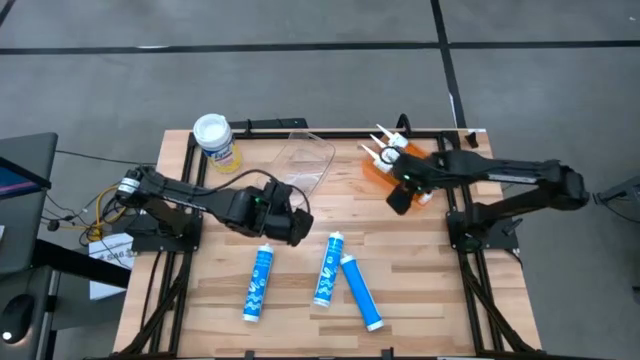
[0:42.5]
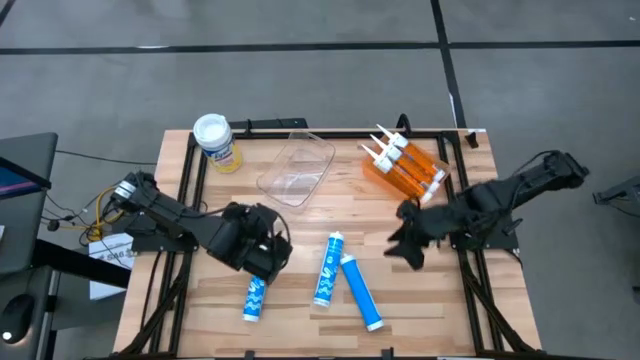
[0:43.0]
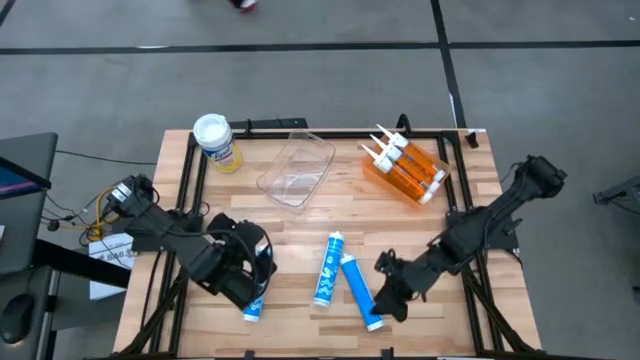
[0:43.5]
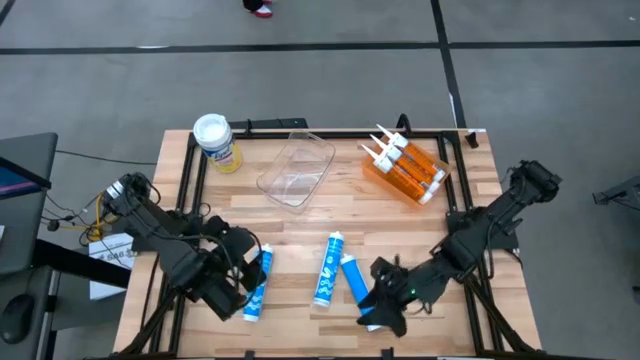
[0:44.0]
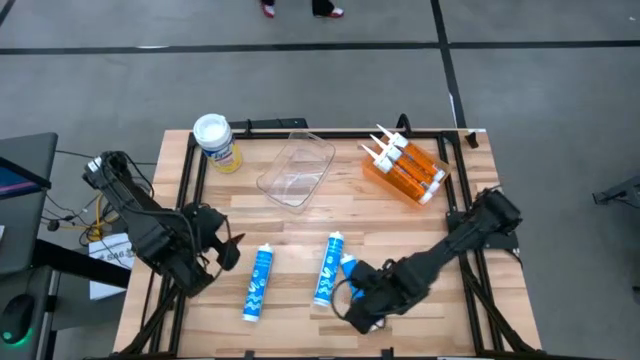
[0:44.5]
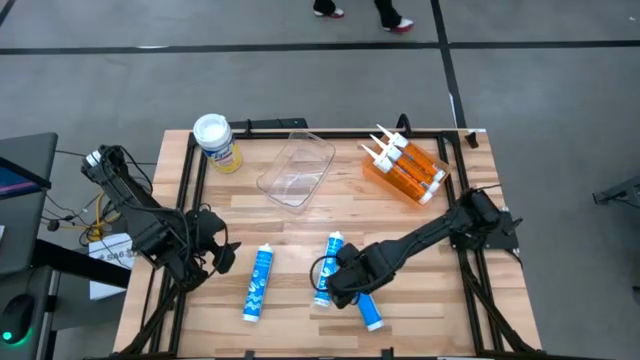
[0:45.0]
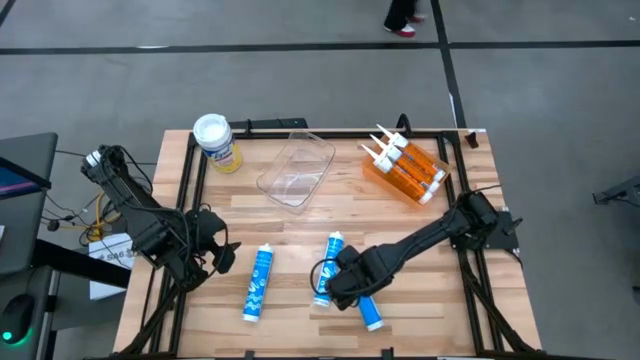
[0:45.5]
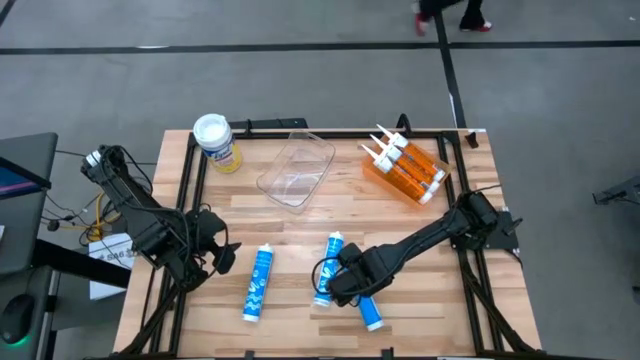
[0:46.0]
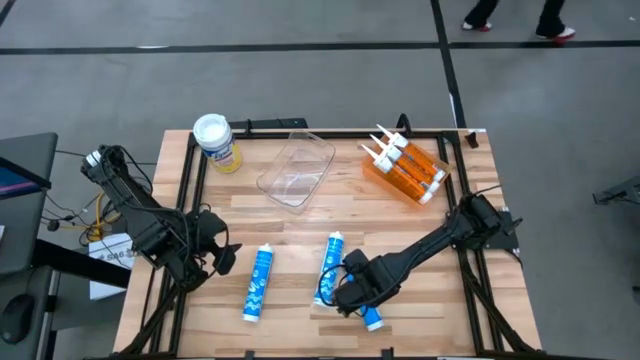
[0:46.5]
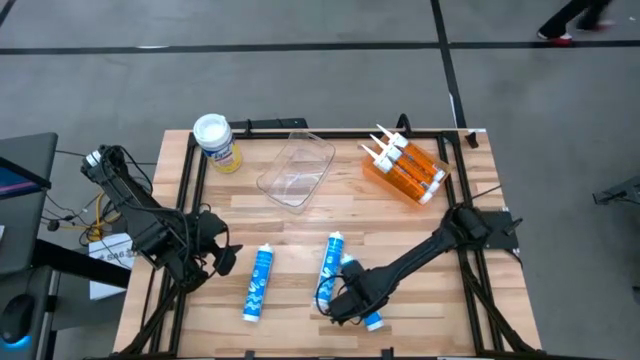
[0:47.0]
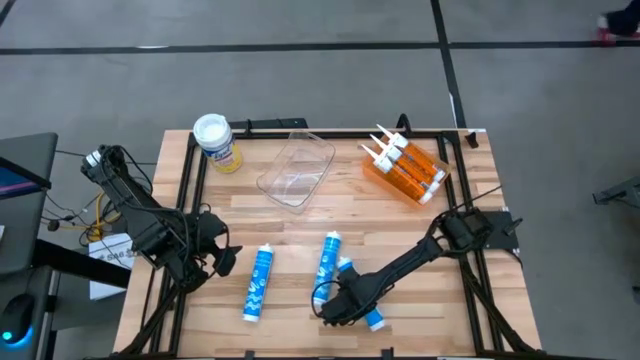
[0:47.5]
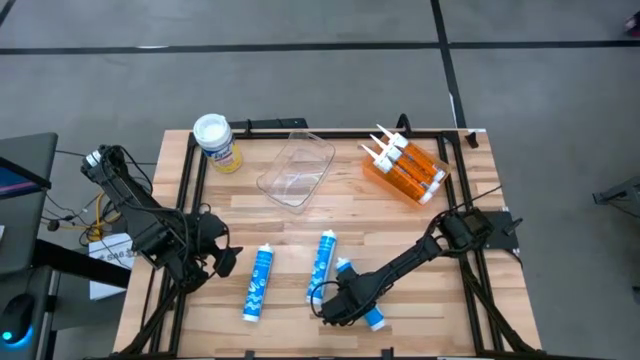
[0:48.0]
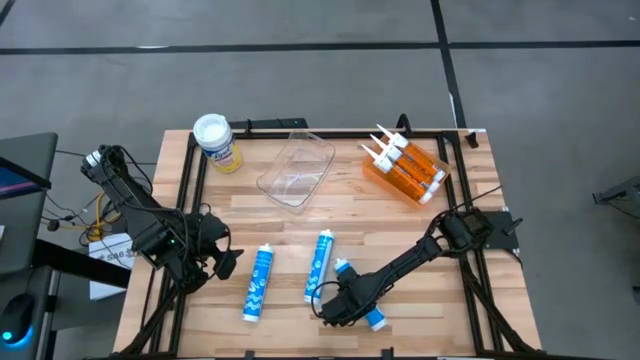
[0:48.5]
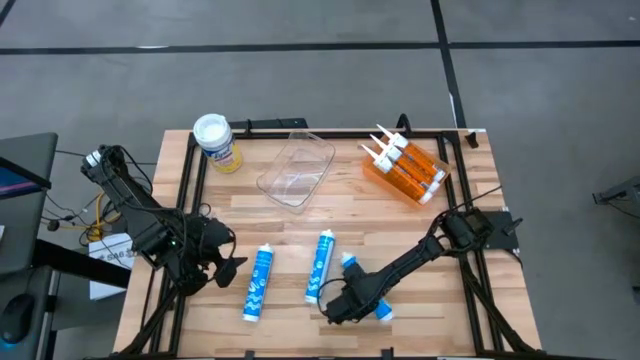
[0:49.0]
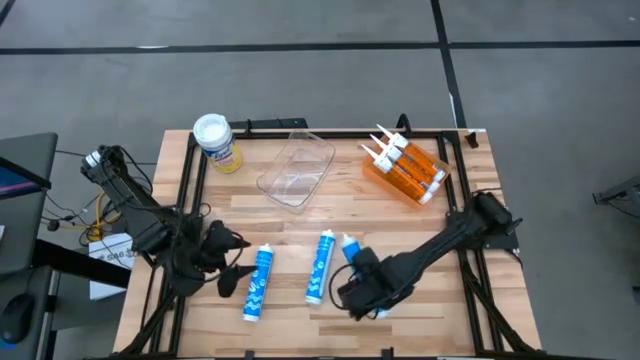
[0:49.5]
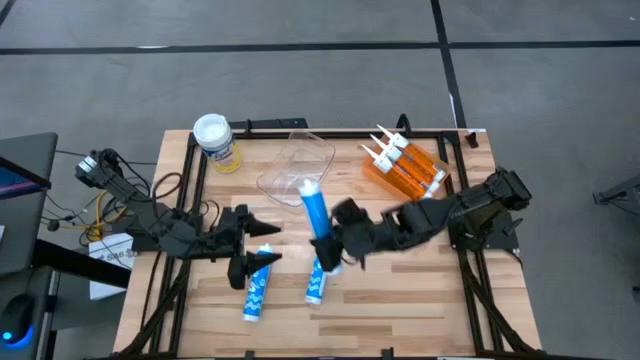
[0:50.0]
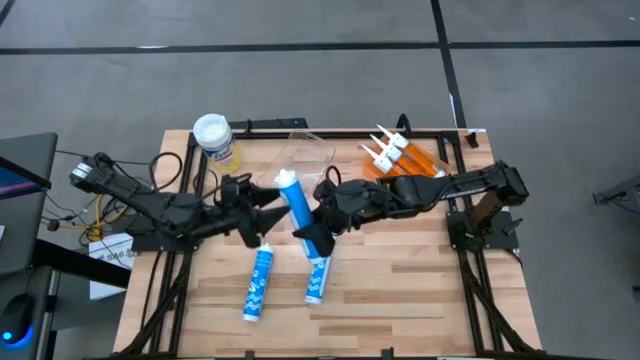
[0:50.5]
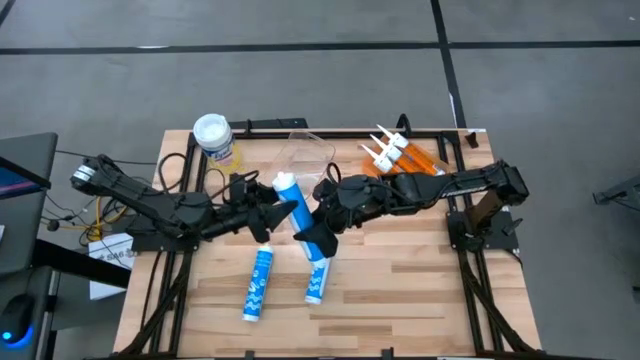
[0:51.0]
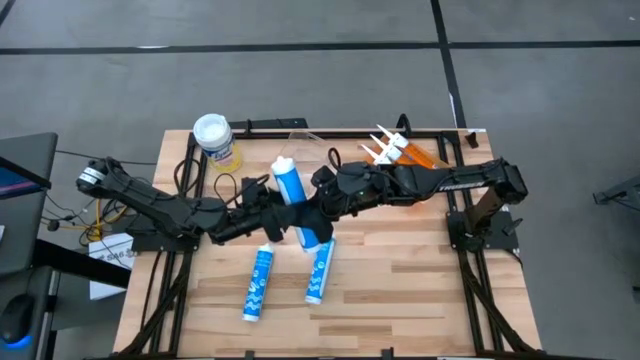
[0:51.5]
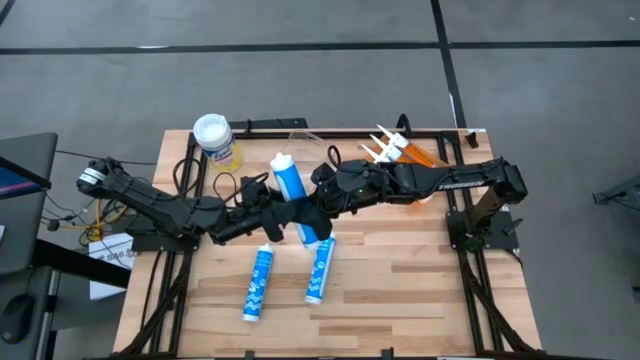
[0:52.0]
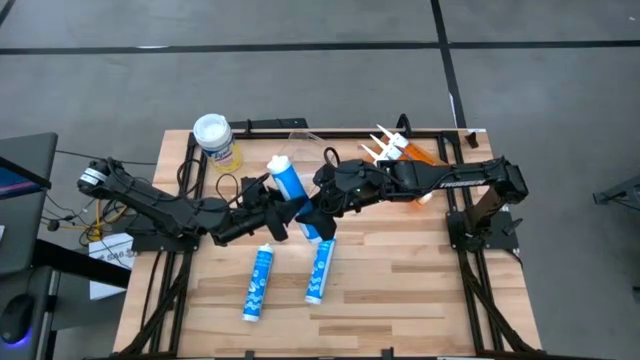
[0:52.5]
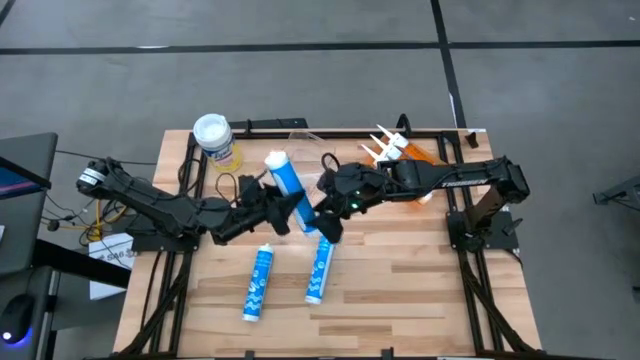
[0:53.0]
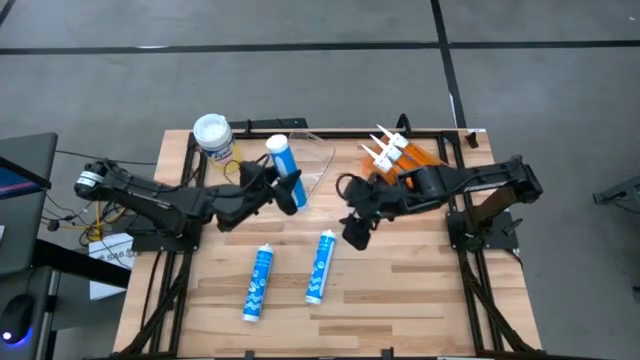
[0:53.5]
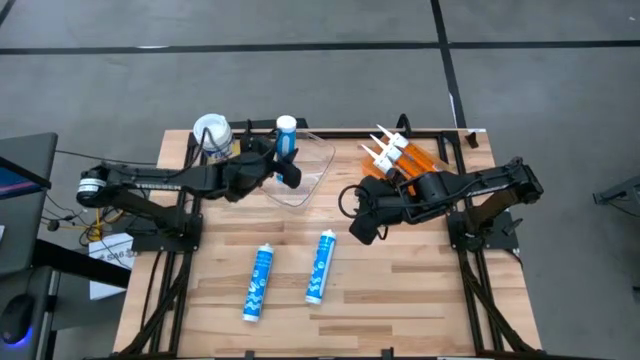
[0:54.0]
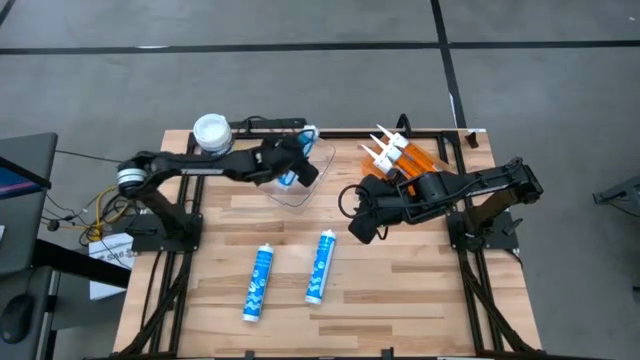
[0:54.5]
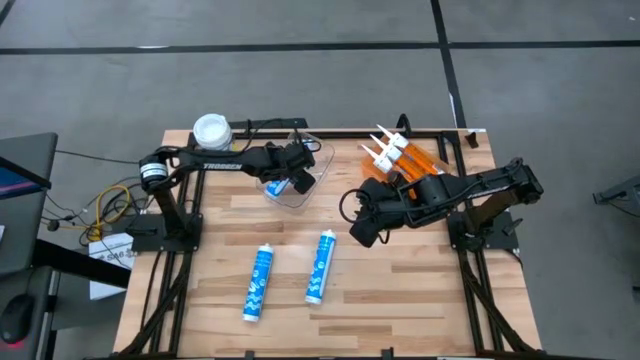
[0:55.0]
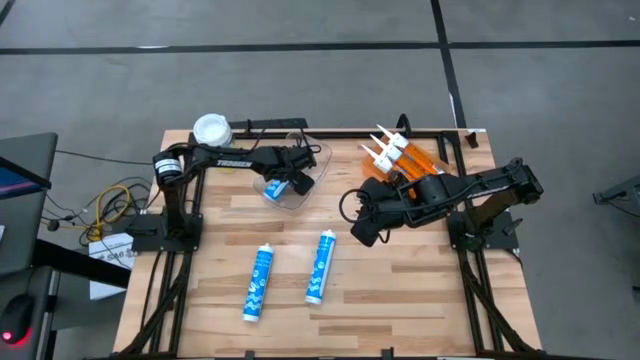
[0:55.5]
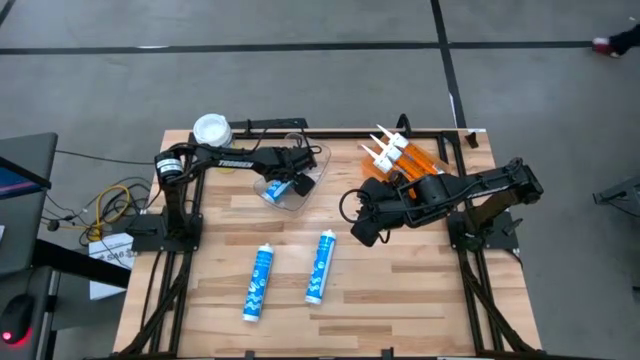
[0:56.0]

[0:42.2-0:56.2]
Task: Pick & place silicon tubes, Sealant and Lysol wipes
Put the right blue sealant into the transparent bin

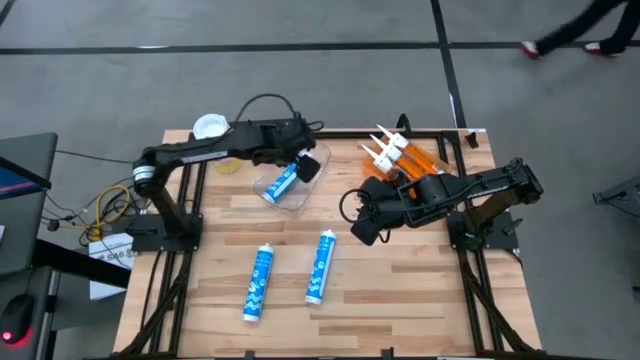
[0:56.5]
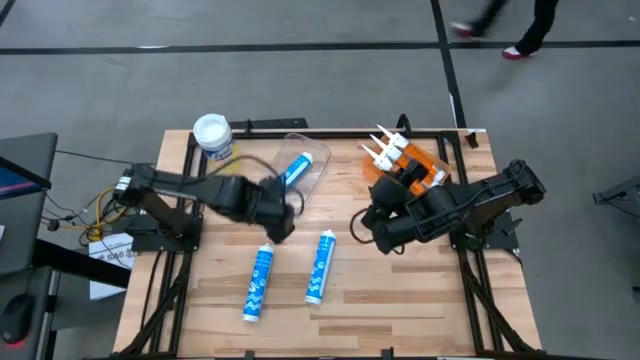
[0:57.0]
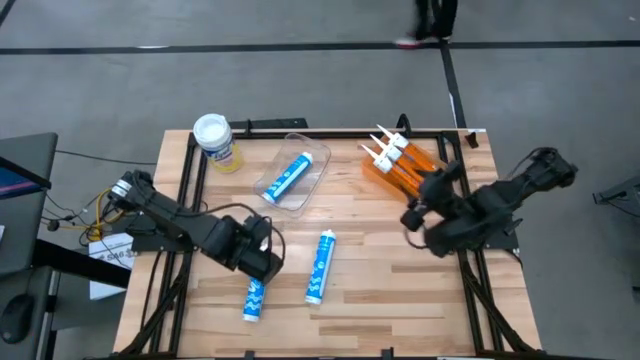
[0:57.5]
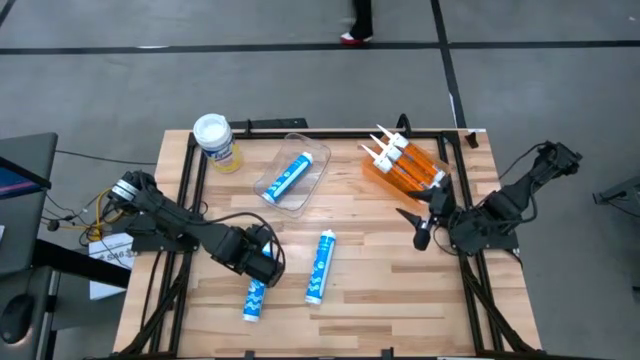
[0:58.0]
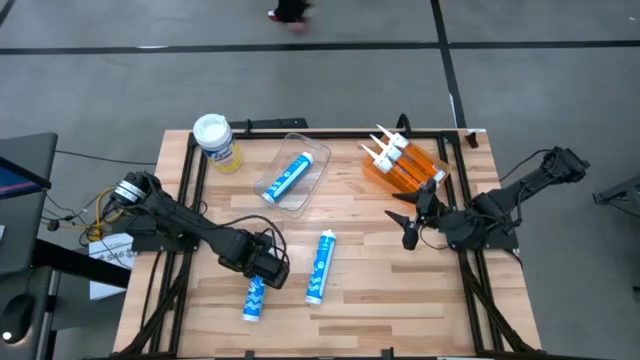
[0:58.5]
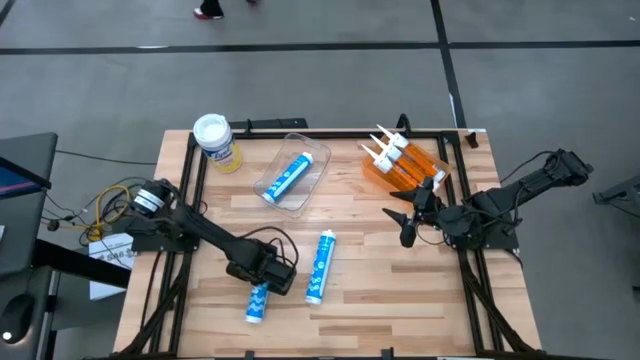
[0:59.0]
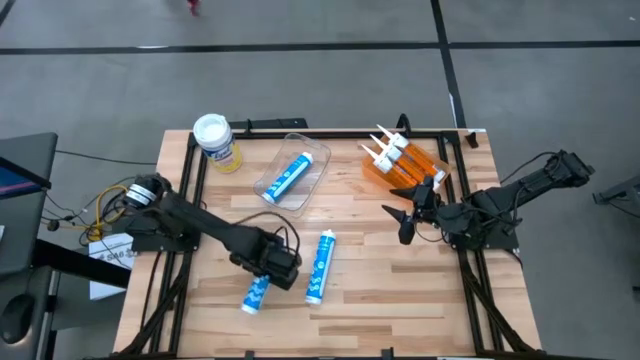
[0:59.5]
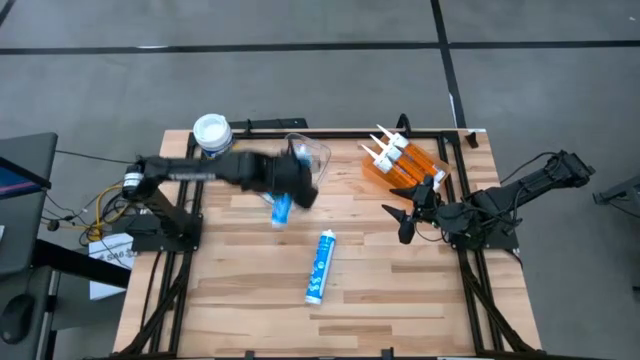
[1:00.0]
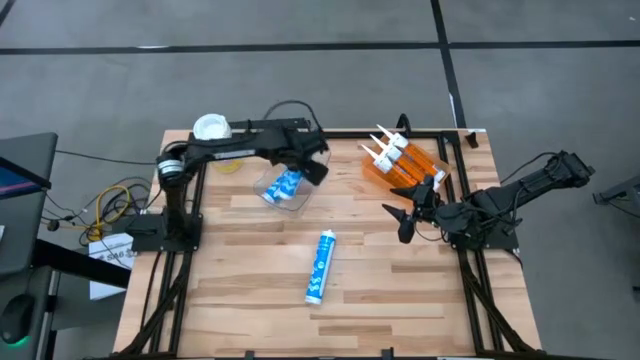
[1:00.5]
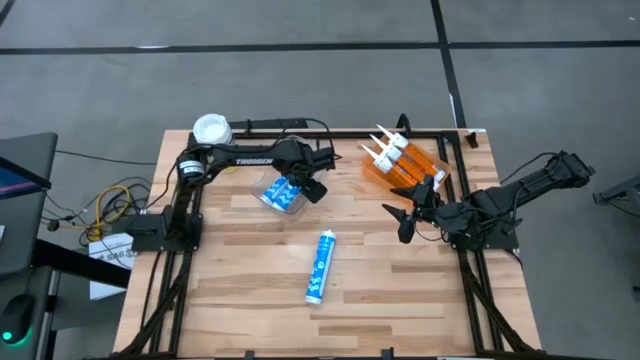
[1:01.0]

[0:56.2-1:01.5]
Put the left blue sealant into the transparent bin

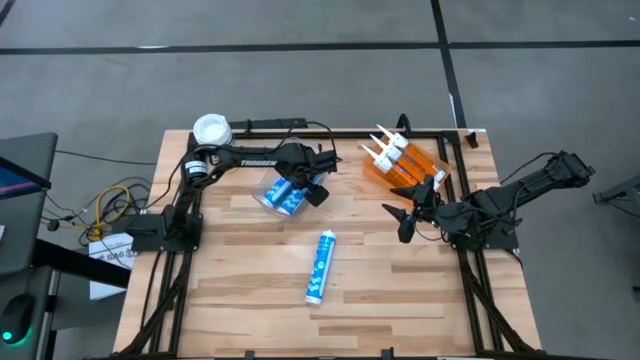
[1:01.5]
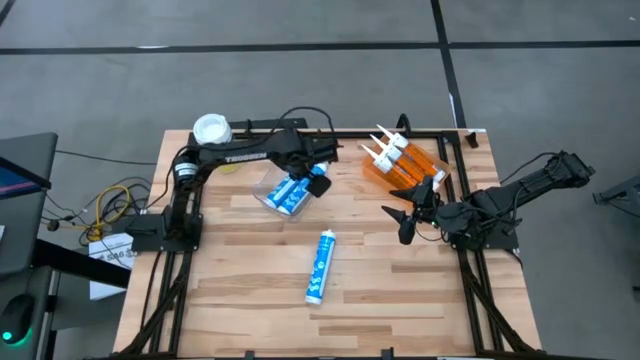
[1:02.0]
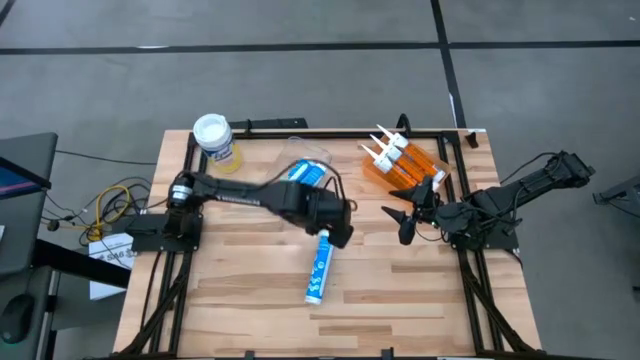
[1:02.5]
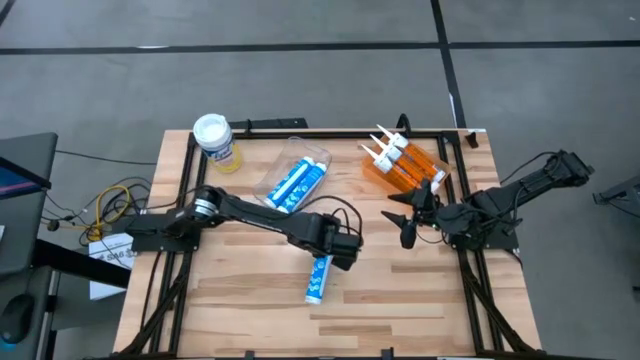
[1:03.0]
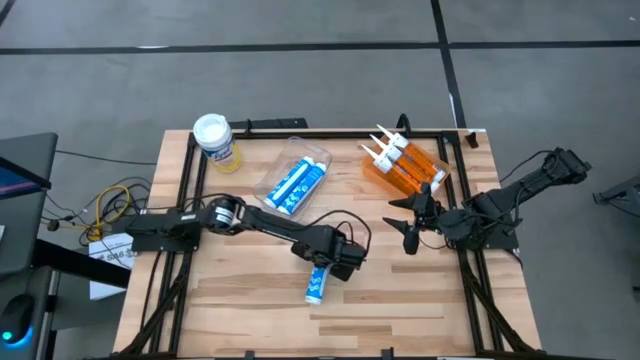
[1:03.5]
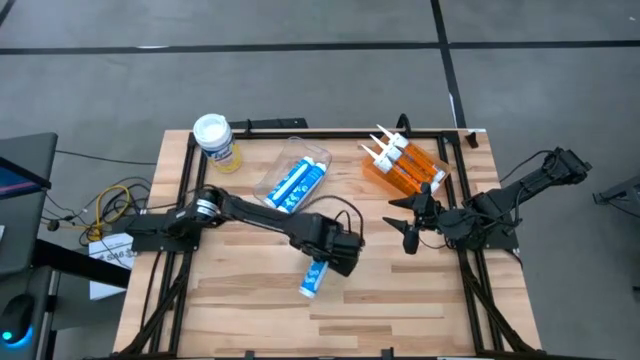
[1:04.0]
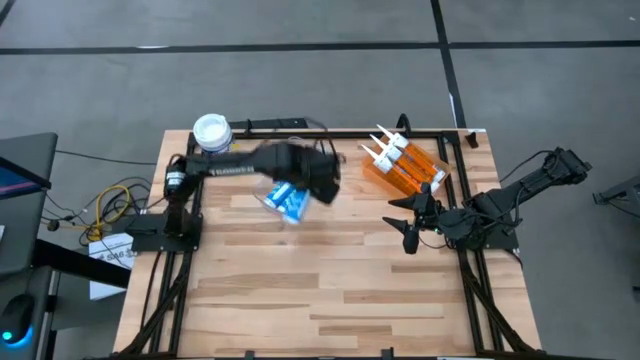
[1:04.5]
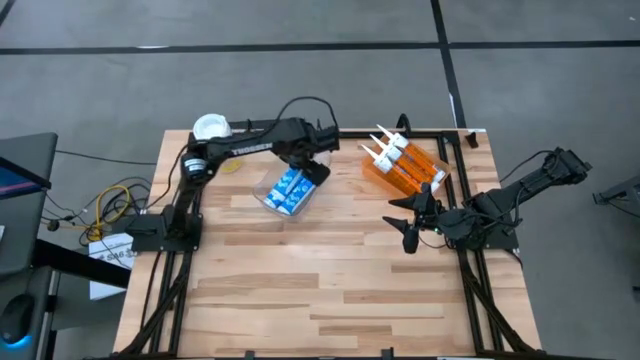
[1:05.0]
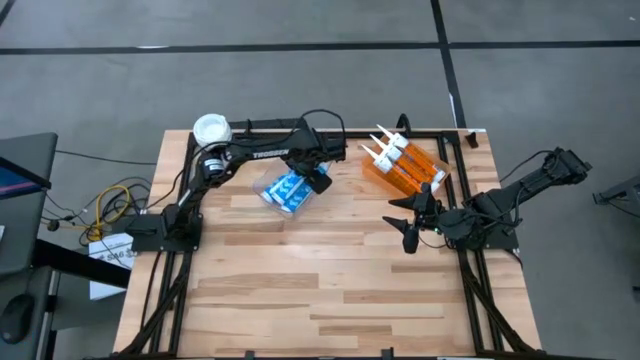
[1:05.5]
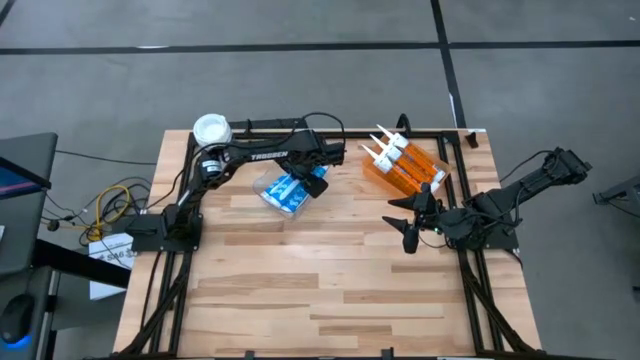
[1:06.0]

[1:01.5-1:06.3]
Put the blue sealant into the transparent bin
